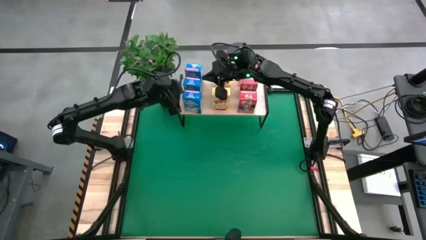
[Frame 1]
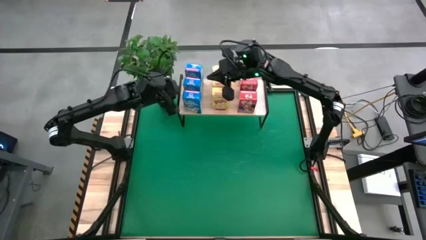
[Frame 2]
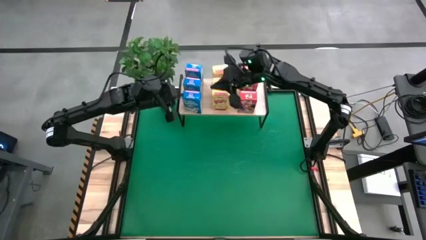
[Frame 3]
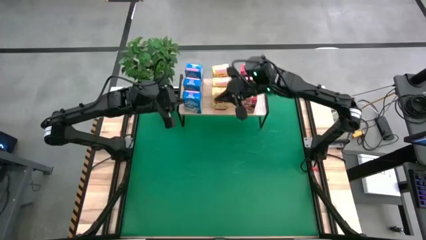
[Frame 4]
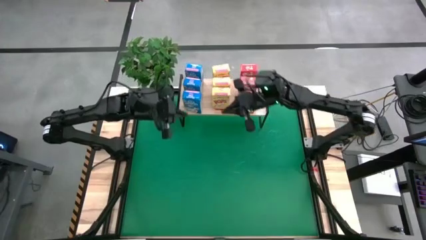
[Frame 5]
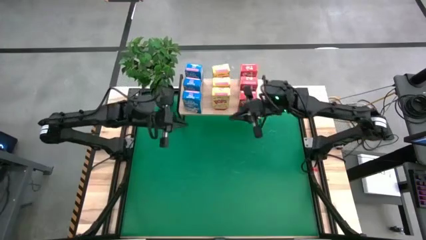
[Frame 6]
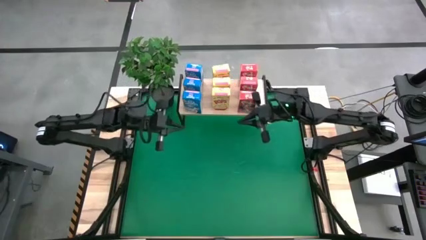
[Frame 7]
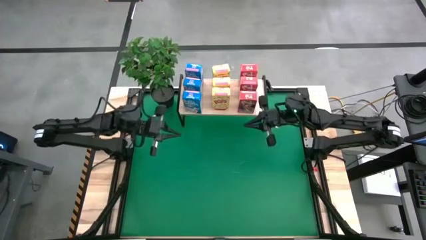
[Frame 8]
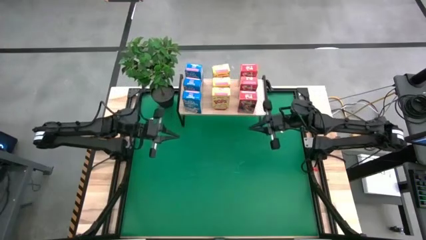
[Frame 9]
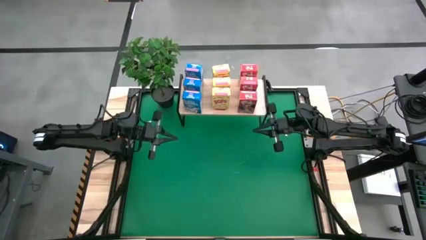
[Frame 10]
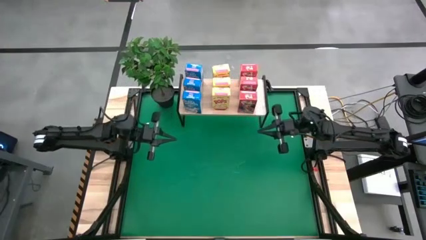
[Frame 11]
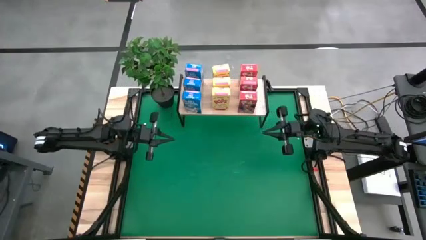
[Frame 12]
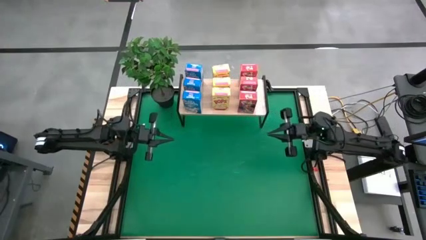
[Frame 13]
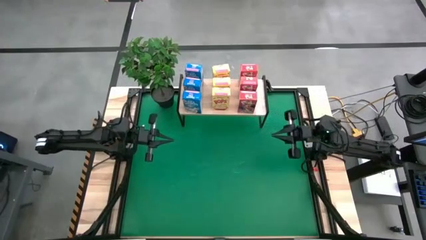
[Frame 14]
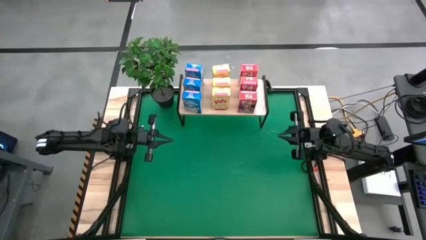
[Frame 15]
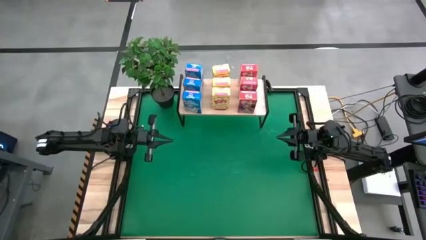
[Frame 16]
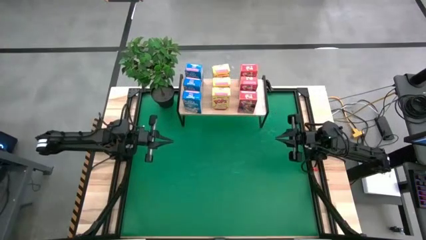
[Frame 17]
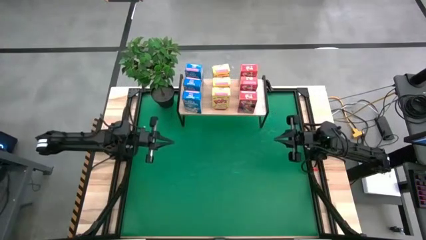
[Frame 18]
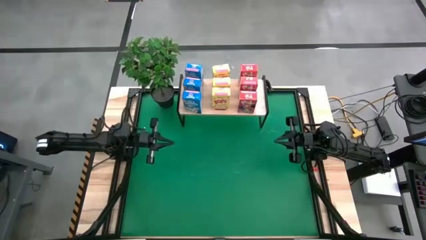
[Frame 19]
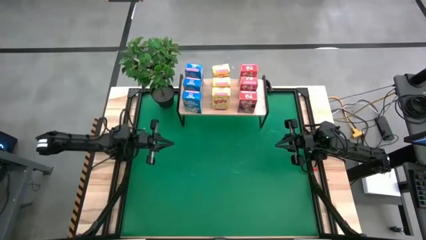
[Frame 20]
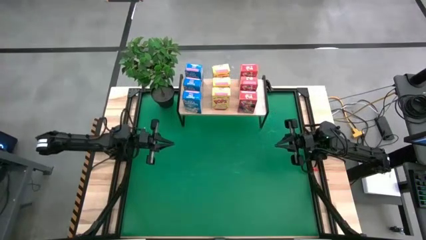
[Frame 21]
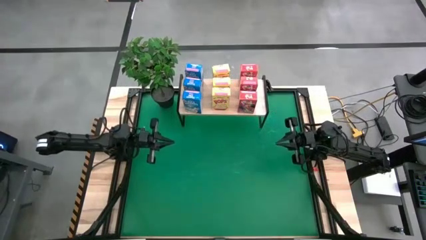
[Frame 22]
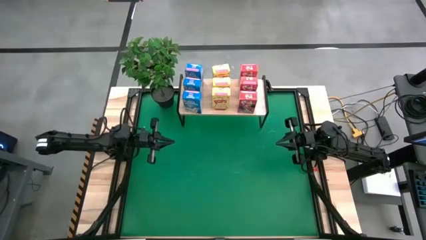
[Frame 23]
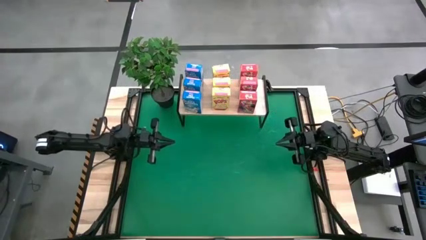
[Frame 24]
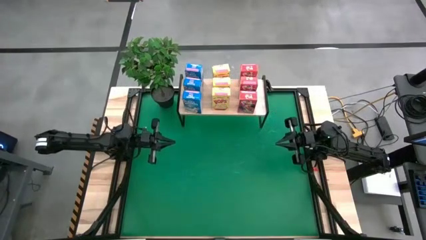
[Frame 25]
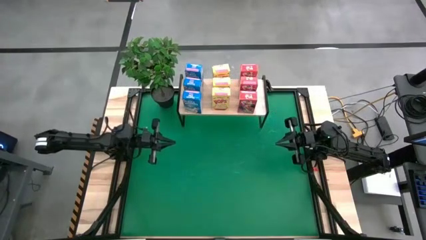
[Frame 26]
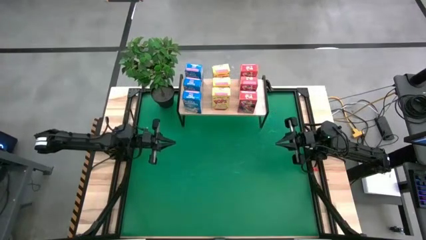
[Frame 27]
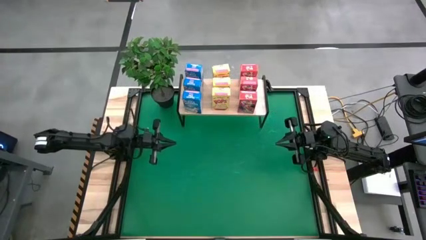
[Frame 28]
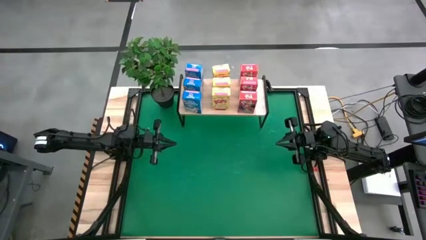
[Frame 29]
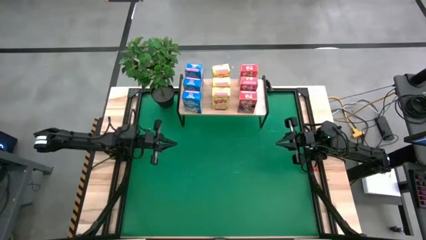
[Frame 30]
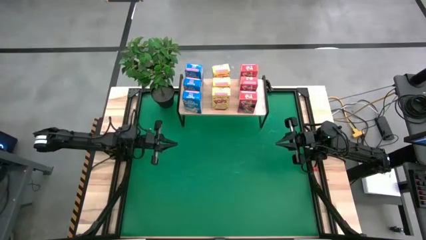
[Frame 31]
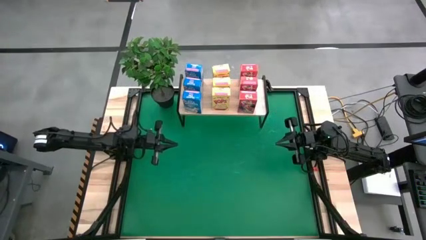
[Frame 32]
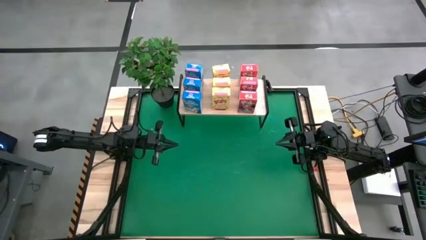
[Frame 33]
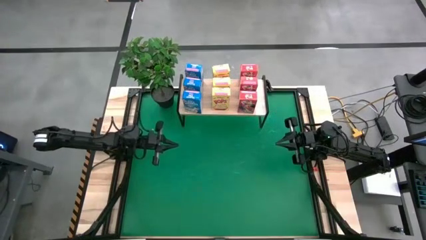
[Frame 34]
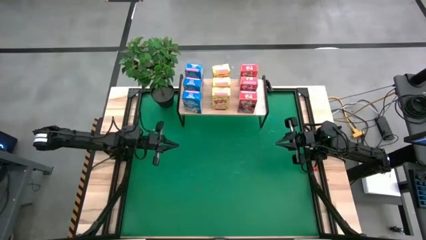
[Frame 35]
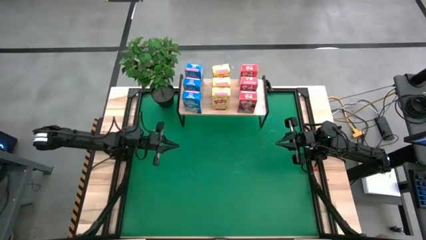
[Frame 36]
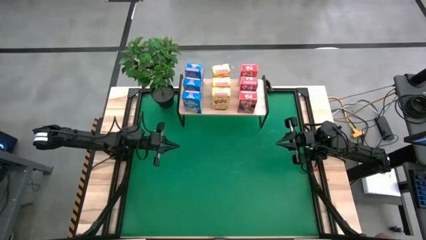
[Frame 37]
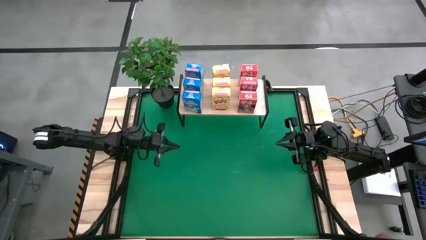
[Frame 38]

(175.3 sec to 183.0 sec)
Task: Stack cereal on shelf
Return to Home Position

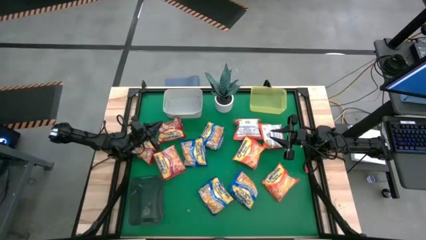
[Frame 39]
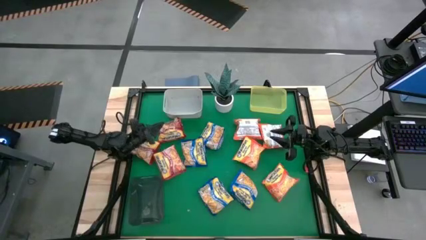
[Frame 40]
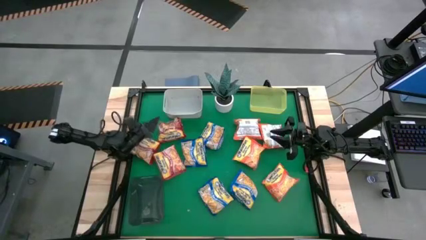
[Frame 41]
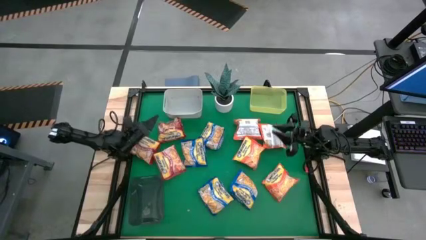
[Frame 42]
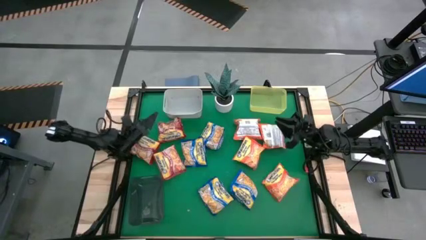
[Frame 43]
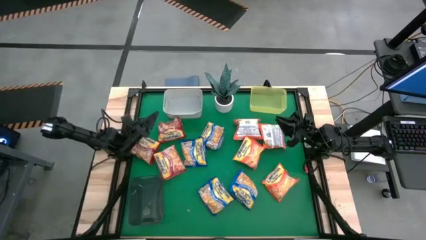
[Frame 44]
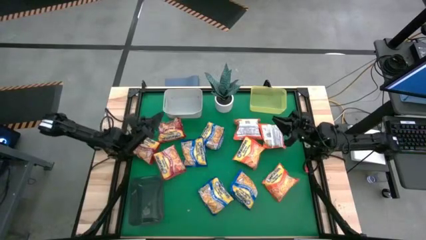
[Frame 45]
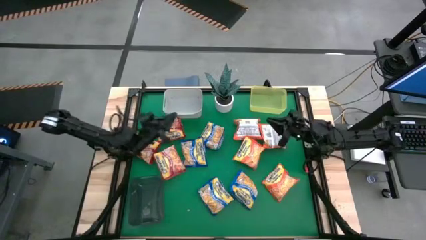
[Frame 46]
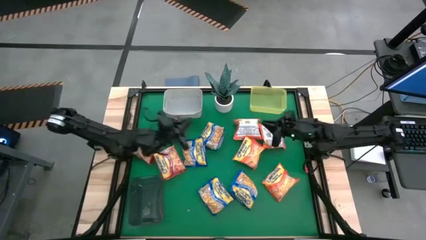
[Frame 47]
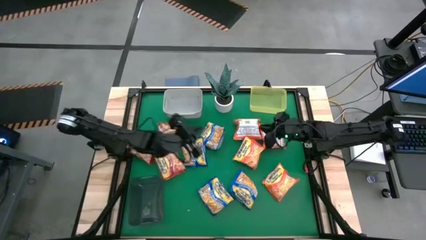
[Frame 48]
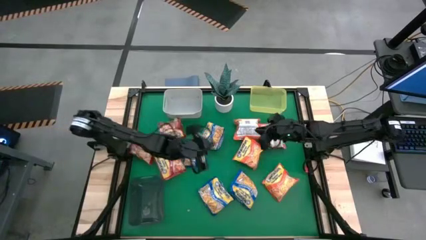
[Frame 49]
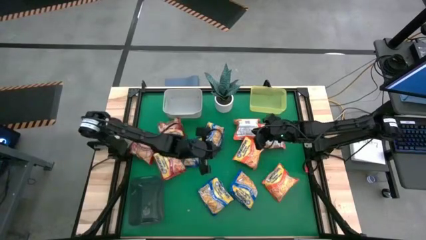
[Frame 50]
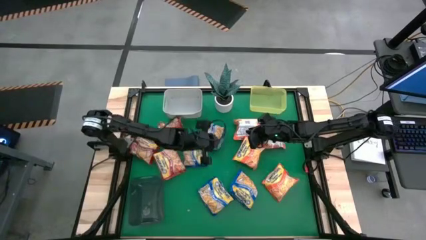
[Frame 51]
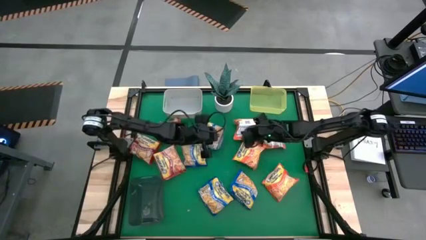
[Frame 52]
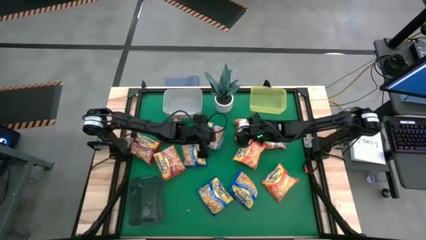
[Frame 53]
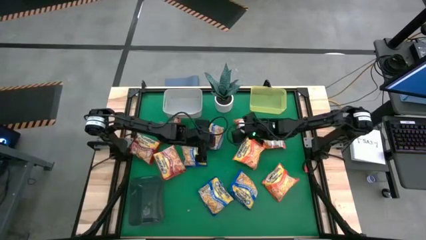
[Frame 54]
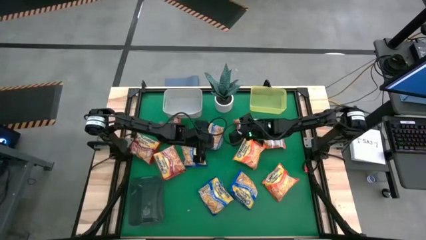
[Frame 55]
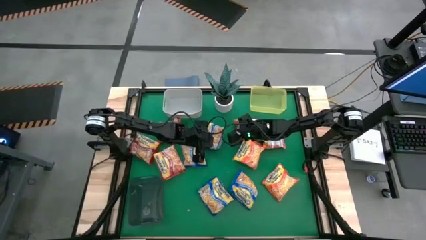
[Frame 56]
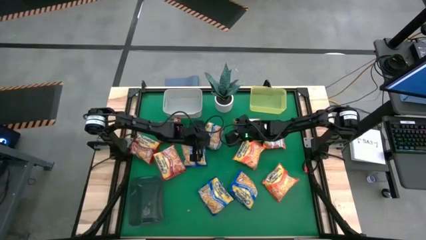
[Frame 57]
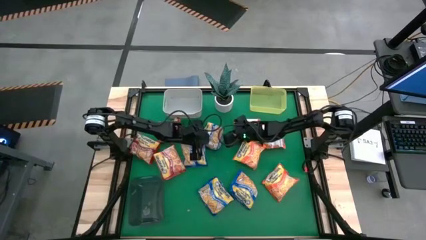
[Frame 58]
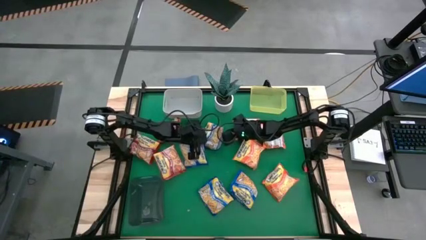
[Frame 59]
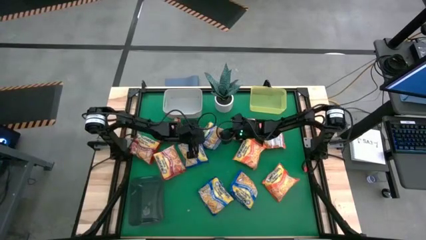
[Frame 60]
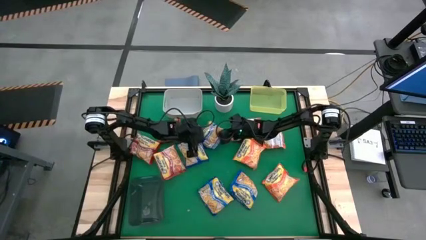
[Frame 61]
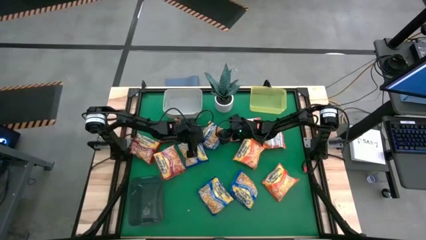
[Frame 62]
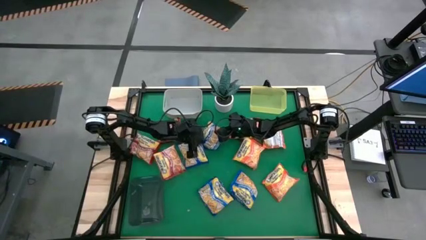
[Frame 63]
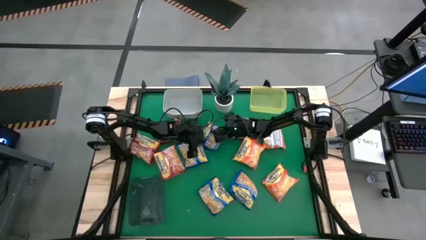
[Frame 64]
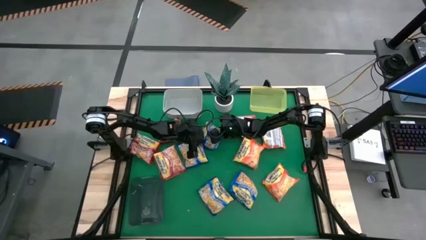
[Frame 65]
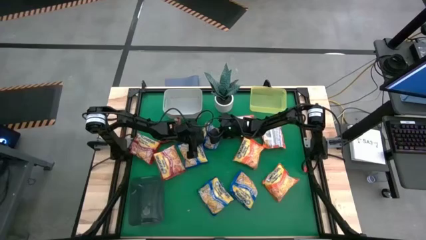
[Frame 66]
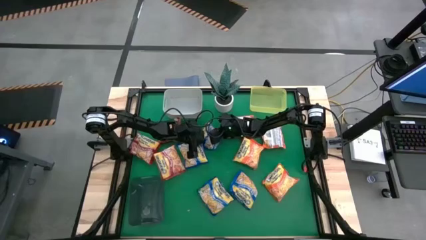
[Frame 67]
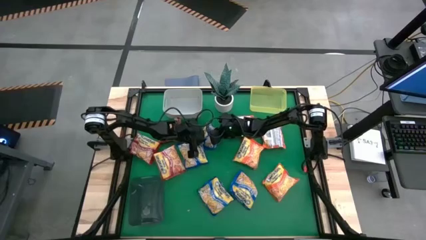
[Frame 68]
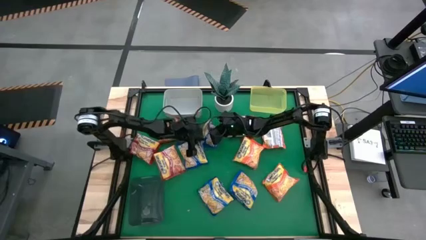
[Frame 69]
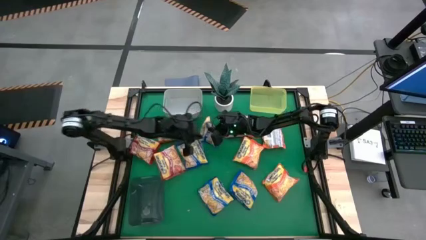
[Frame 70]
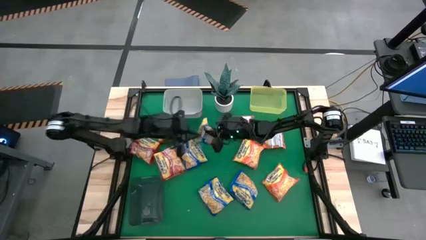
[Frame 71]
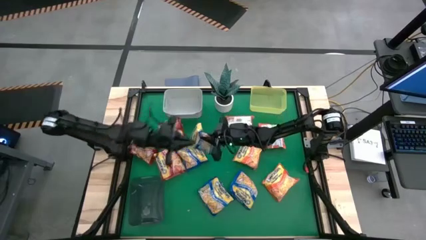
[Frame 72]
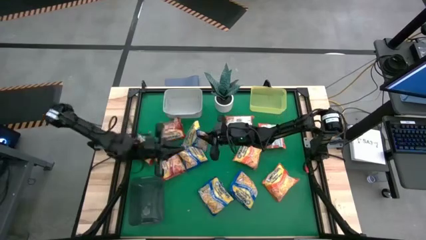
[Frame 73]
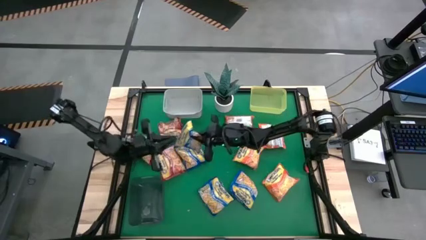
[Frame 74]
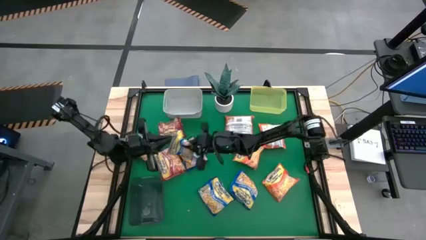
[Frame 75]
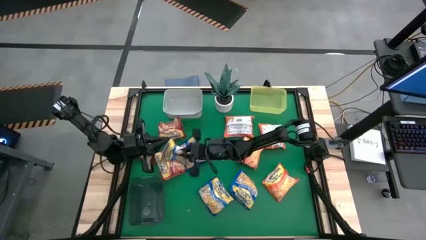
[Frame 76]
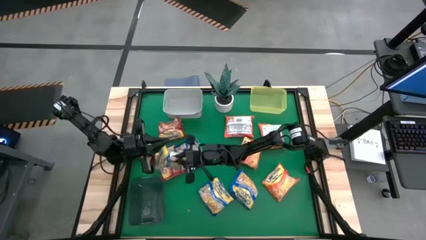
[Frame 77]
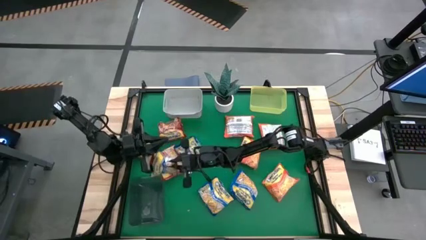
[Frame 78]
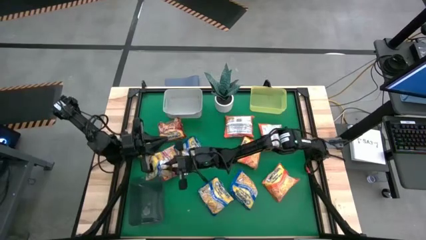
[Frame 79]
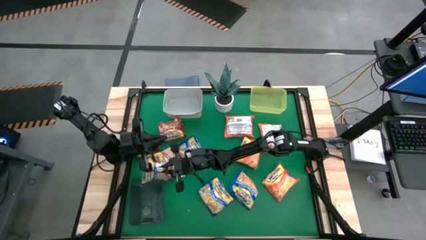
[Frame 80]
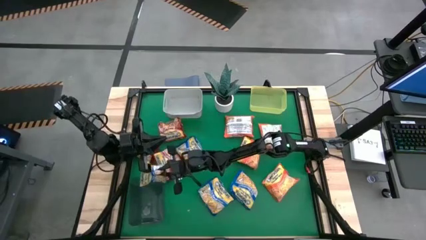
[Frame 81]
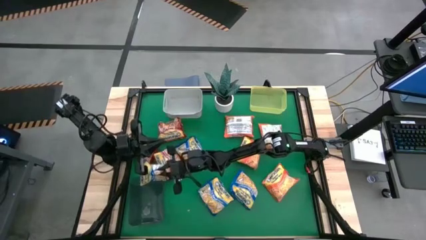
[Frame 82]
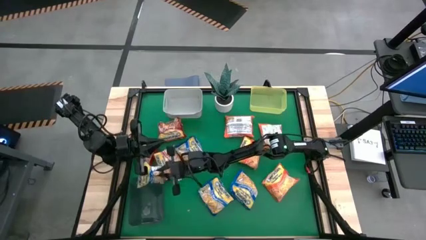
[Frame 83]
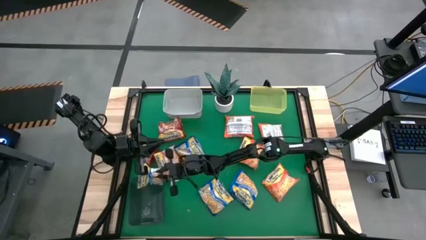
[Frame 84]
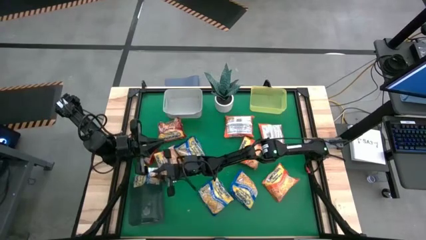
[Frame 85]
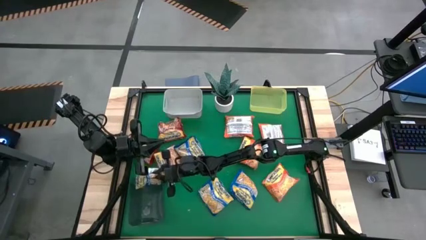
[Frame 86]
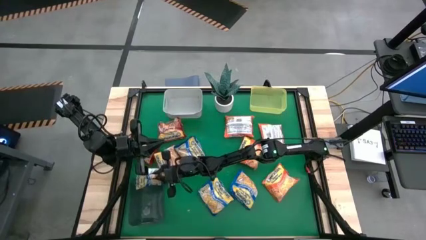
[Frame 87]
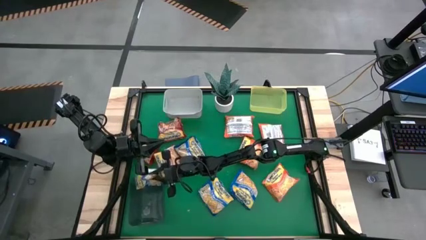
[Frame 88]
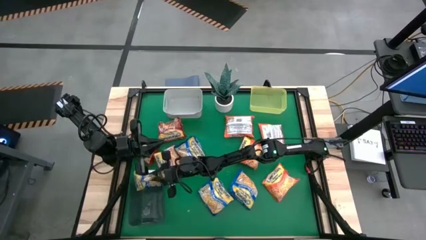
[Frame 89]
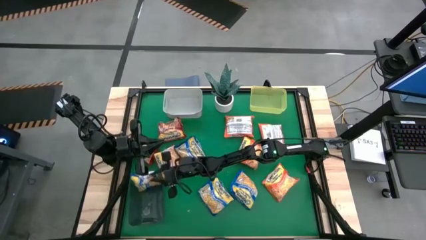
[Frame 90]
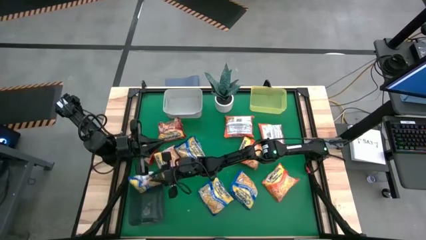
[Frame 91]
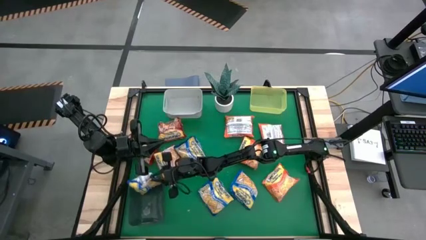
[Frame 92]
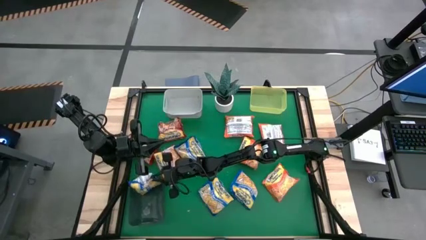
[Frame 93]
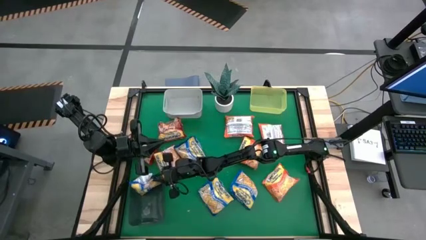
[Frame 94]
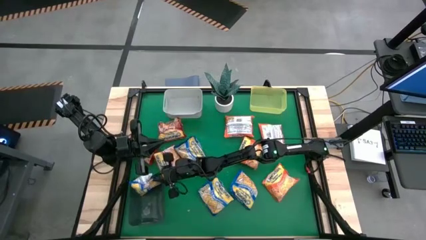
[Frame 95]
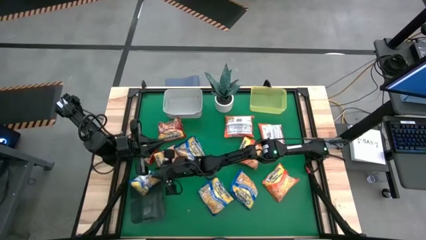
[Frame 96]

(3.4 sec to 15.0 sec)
Task: Sort Maruchan noodles
Put the top middle blue noodle pack into the black bin
